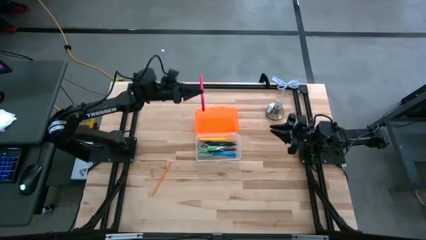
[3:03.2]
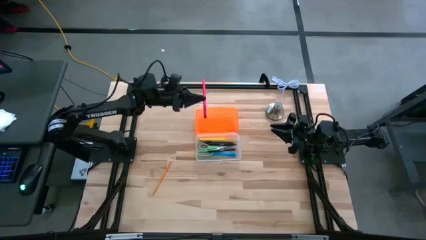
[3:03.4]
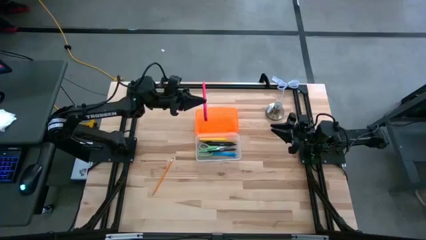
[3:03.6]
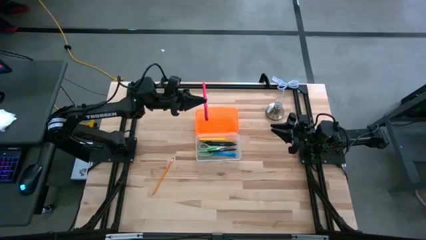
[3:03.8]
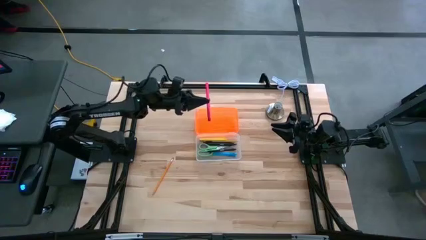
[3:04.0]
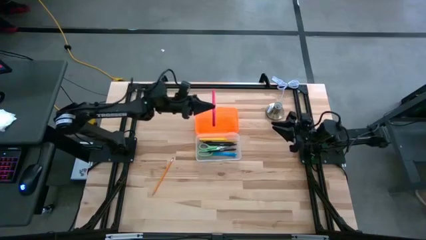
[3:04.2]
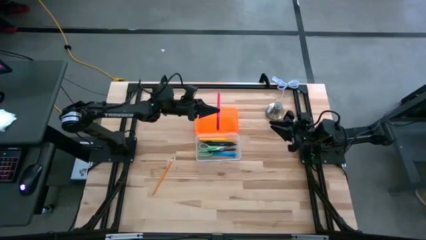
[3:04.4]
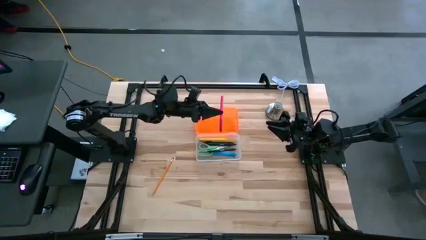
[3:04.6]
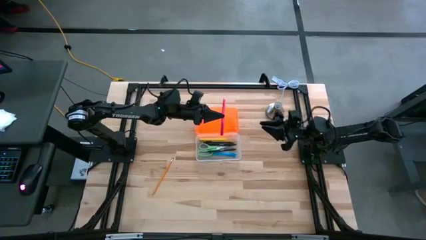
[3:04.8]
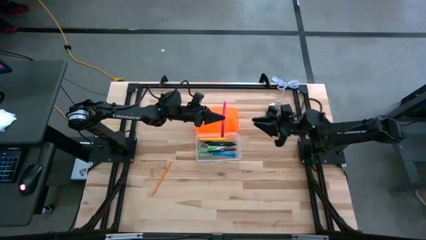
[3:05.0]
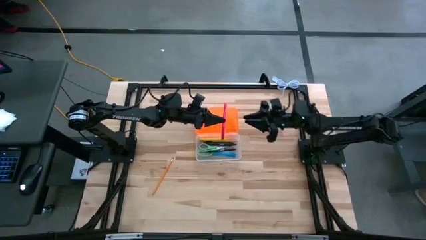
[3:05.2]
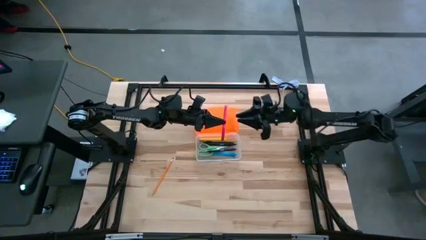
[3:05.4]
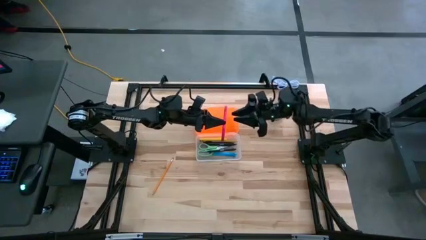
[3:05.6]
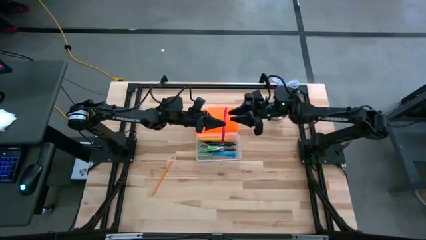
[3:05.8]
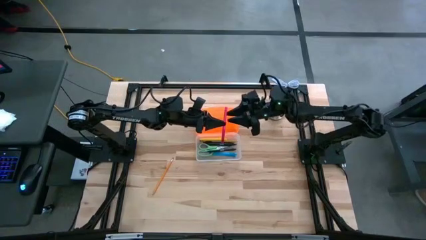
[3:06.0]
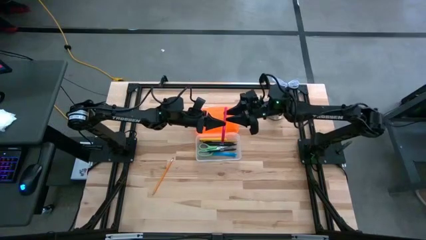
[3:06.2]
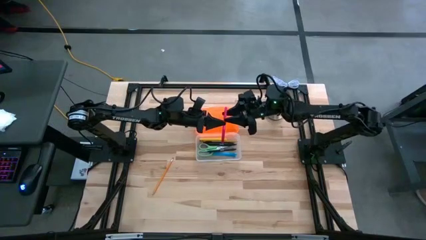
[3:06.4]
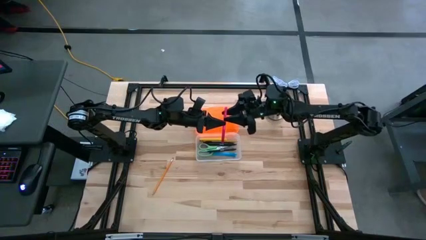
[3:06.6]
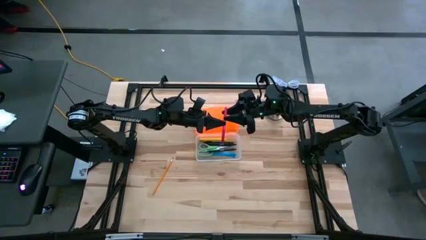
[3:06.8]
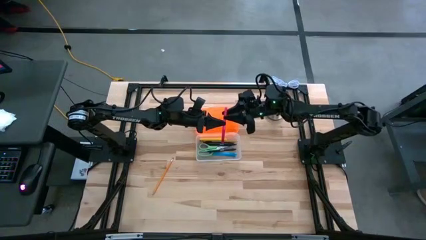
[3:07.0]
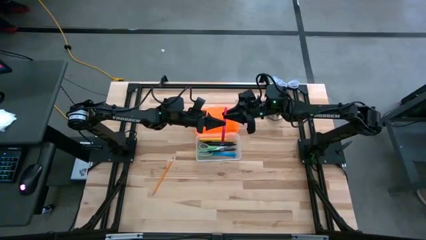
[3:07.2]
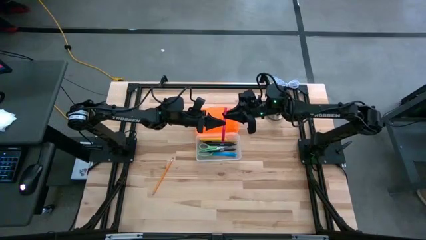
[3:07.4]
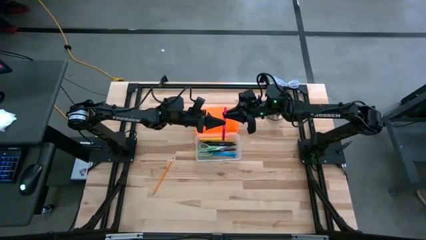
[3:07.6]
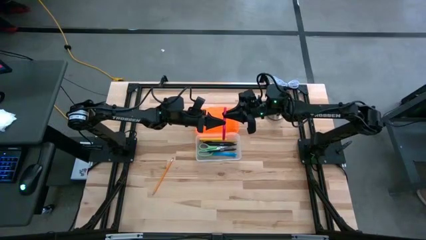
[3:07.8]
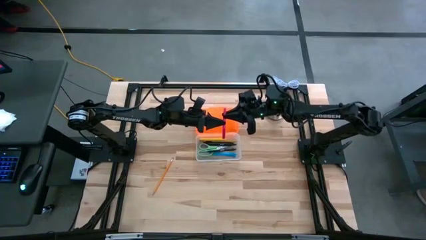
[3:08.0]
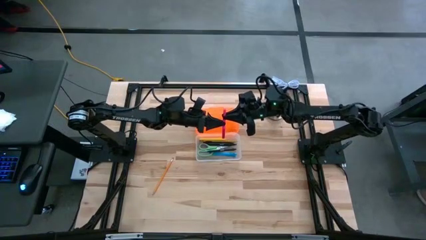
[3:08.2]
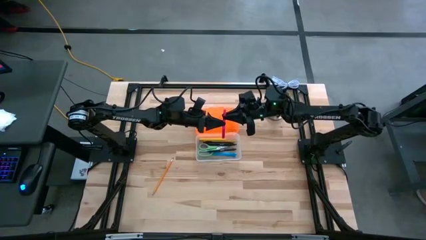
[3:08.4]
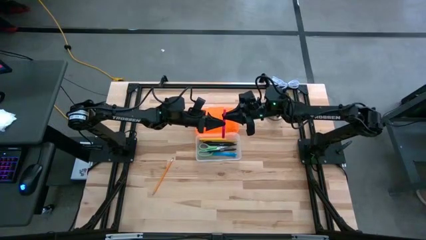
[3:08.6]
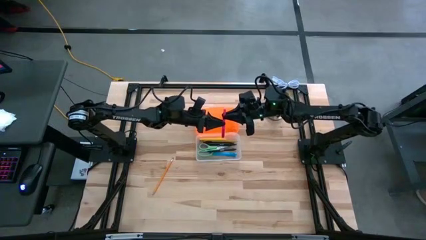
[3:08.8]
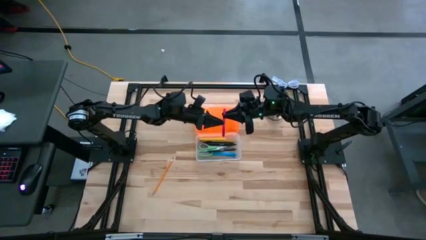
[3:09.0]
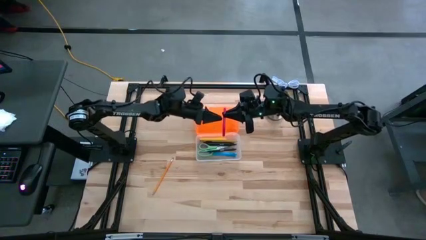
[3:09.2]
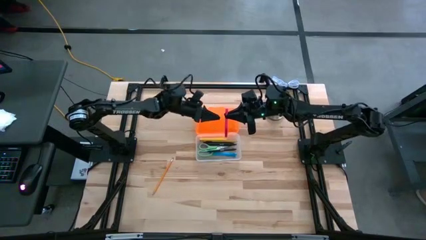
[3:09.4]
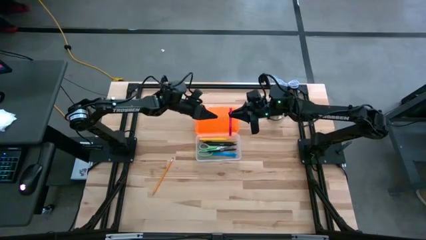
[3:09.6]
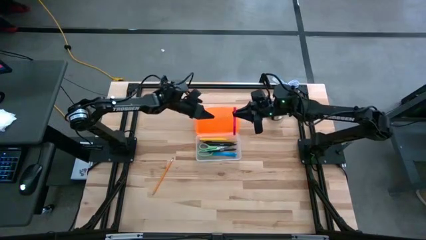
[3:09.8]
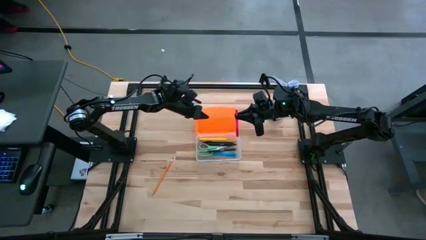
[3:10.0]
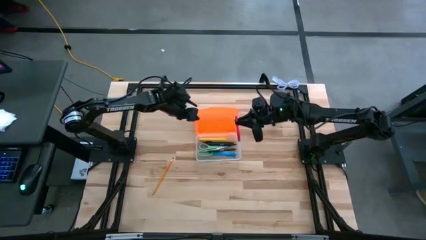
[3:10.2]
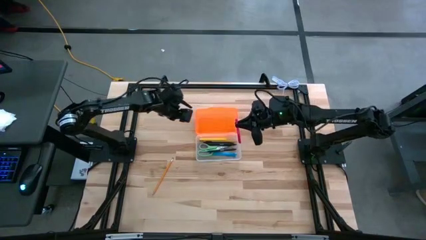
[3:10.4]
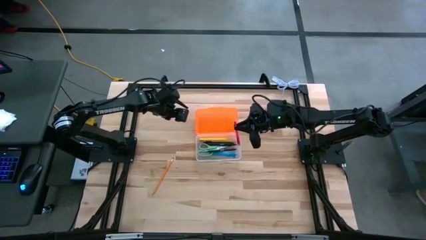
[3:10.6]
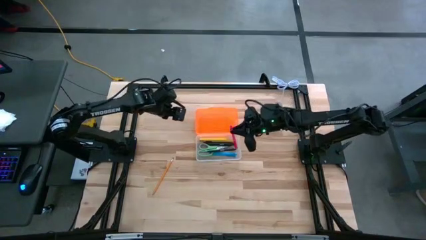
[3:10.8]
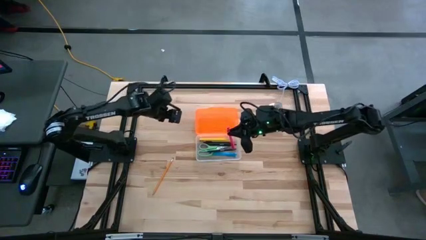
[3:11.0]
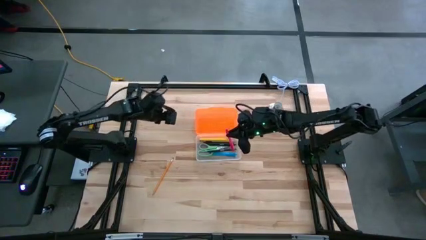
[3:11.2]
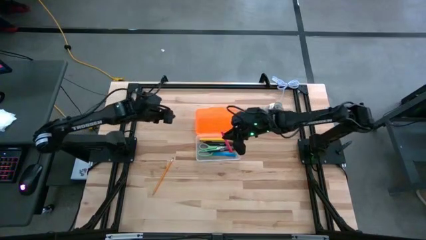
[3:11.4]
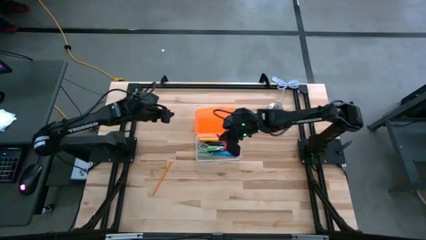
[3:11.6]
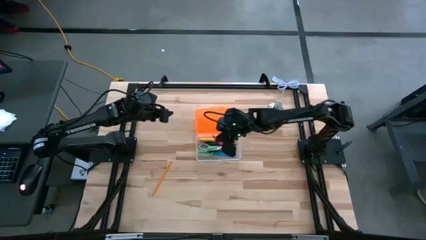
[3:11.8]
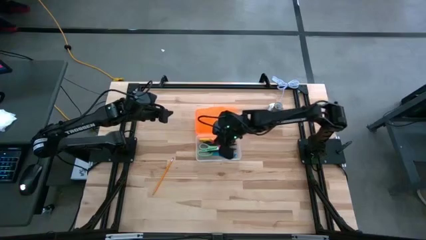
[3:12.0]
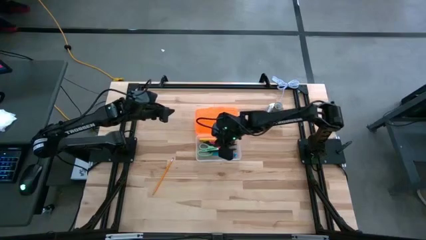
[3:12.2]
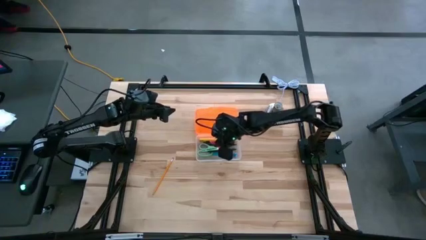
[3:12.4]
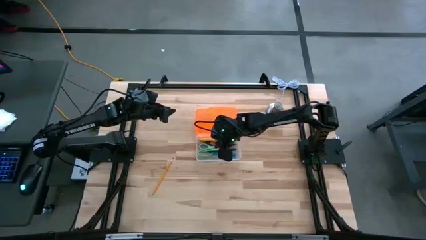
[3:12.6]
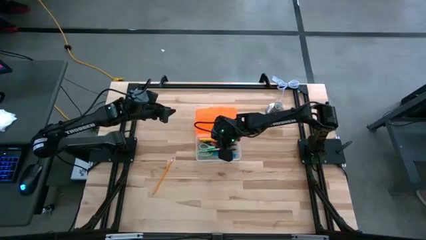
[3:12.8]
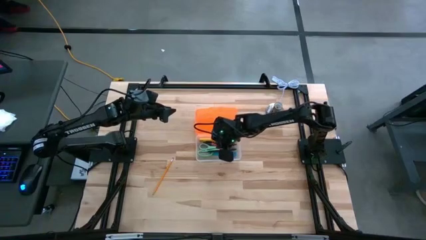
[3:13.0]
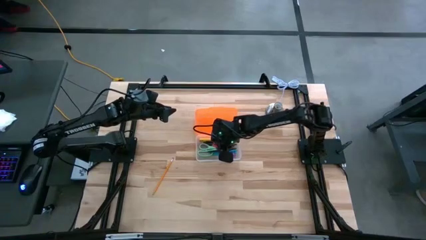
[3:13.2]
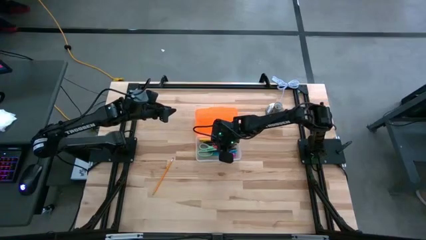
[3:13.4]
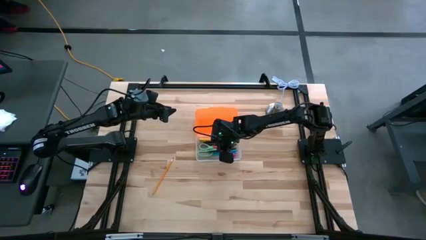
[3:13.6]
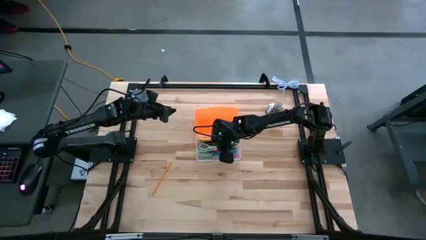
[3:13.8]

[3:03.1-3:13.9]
Task: Pick & place school supplies into a supply box
Put the pink pen into the orange supply box
